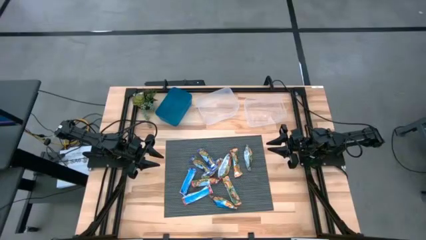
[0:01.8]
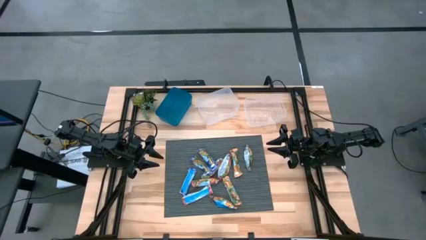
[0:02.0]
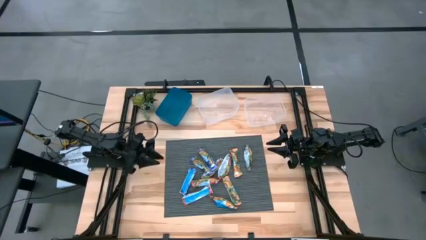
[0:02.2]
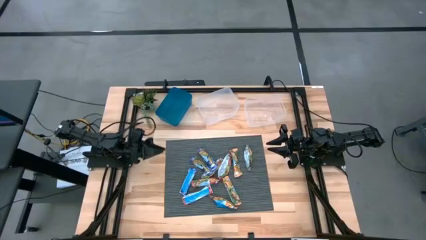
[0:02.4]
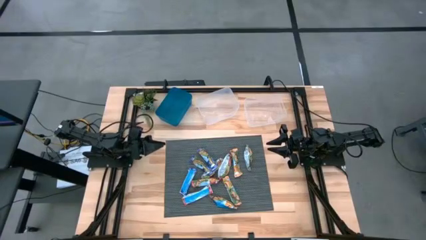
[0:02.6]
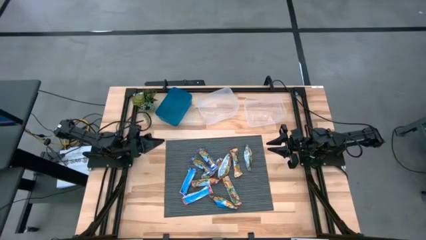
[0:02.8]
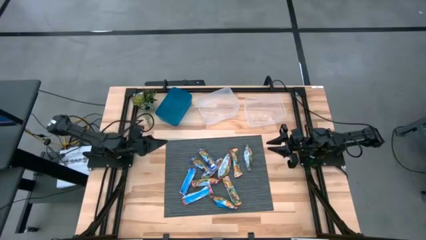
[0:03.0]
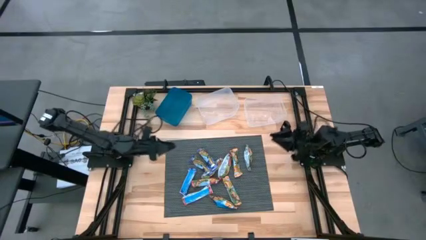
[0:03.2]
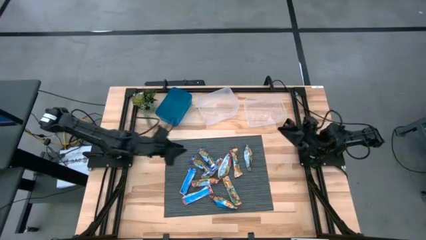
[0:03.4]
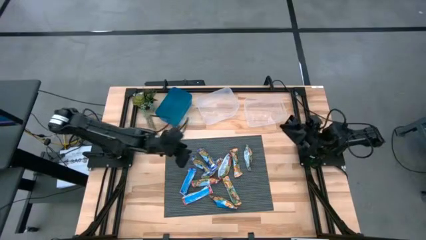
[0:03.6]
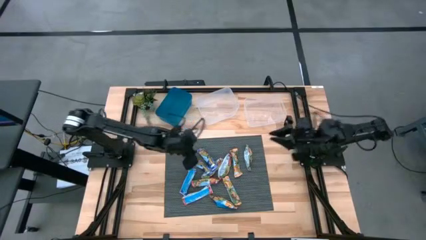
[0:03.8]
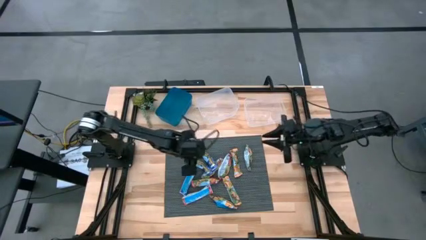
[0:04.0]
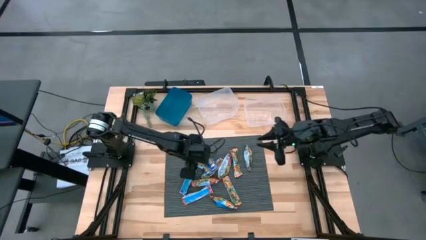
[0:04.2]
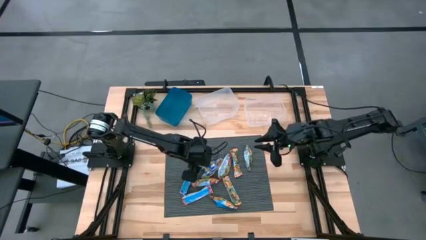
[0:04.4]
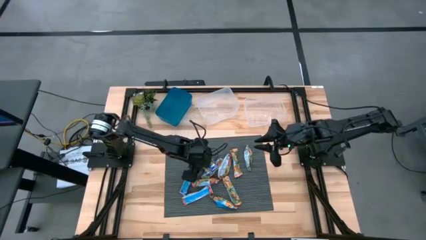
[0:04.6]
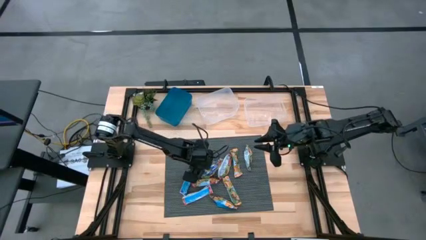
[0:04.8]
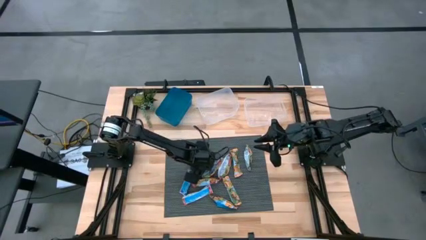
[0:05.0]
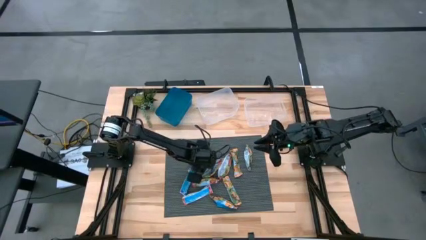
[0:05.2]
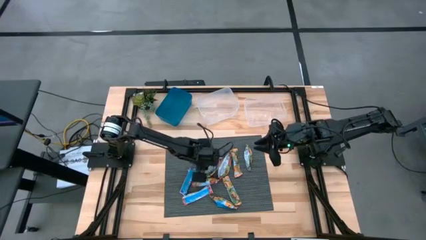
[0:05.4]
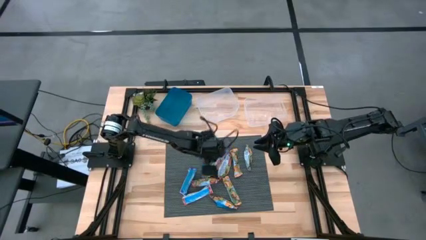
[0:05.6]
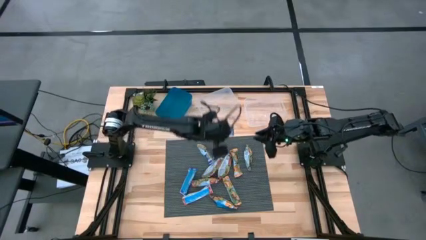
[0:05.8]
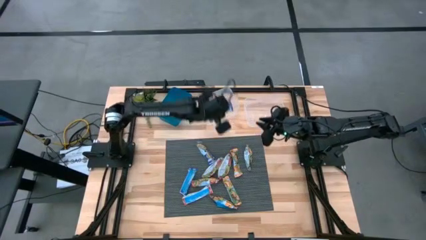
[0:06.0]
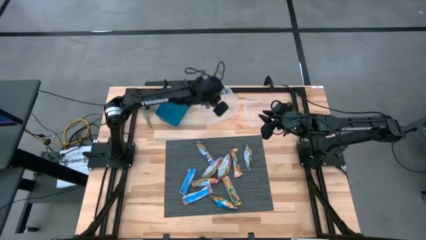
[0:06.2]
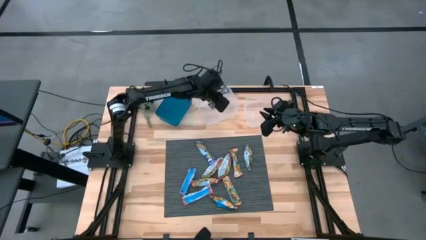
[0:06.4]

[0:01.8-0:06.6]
Task: Pick and place Granola Bars by type
Put the middle blue granola bar into the left transparent bin

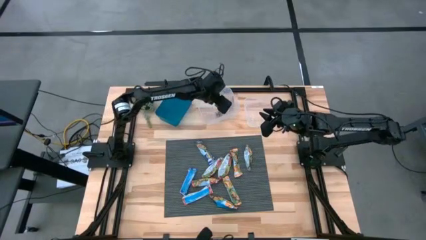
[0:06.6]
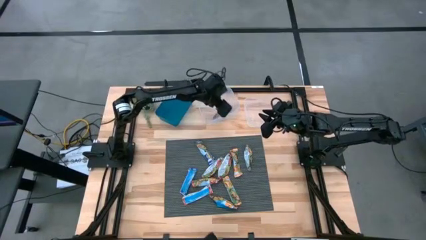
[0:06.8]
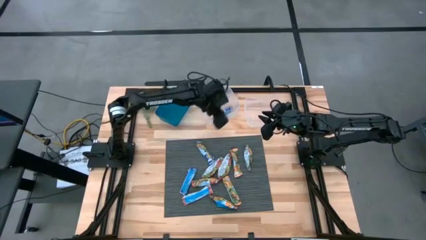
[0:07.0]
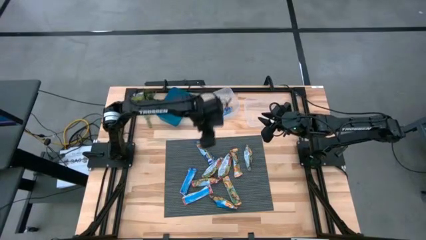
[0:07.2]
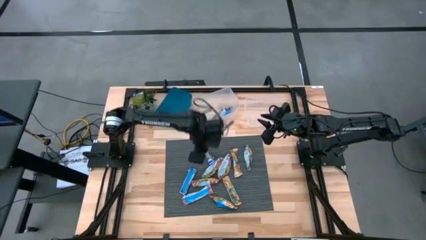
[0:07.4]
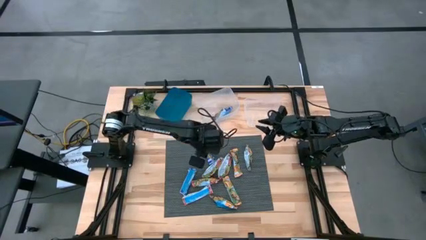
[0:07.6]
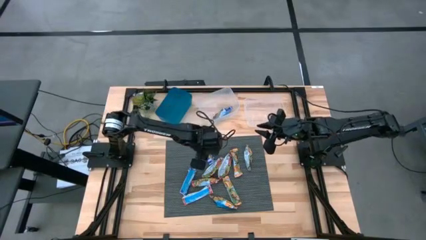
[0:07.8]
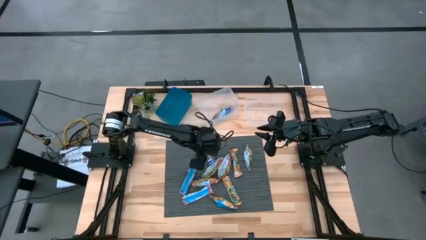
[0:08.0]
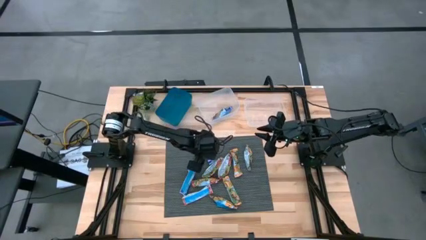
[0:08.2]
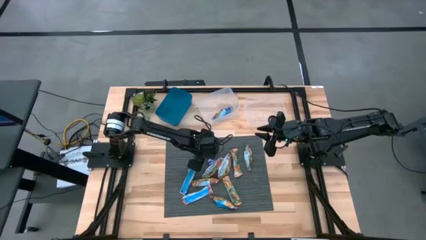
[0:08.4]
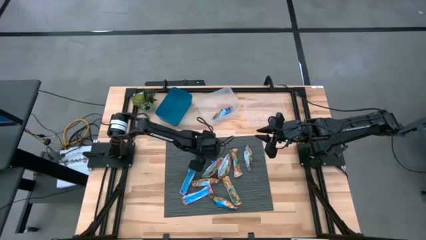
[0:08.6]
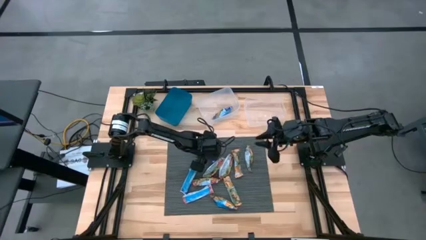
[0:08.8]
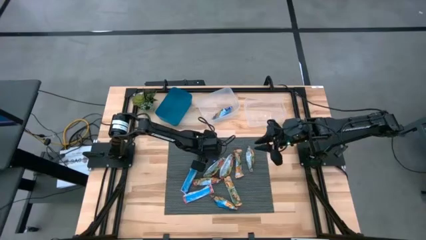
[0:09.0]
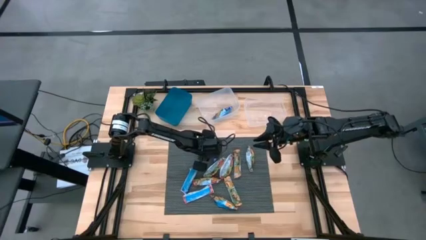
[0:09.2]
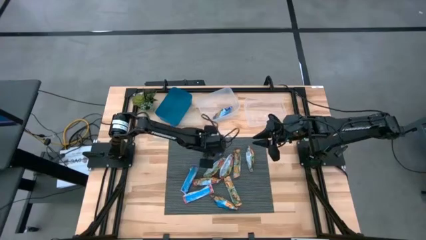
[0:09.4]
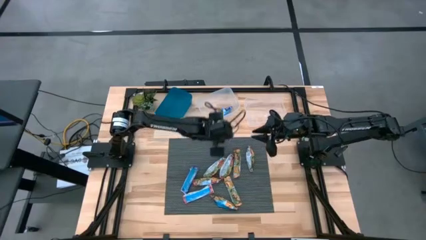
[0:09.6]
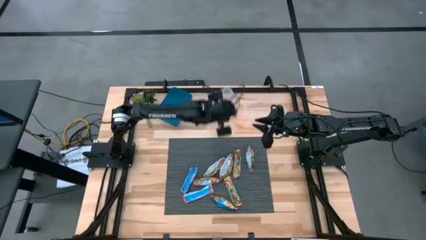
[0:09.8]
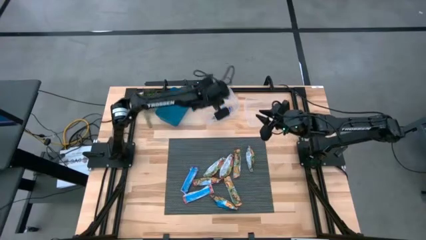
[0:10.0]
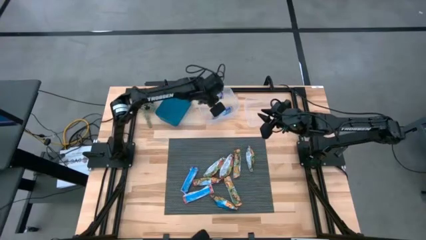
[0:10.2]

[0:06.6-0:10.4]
Put the top blue granola bar into the left transparent bin

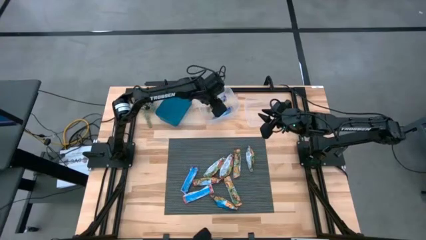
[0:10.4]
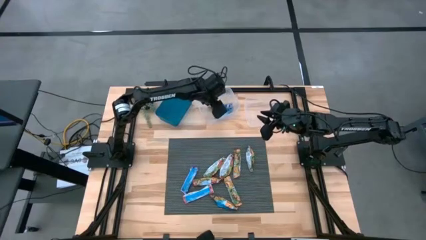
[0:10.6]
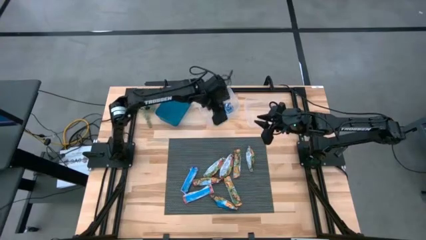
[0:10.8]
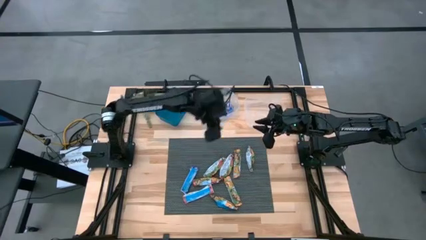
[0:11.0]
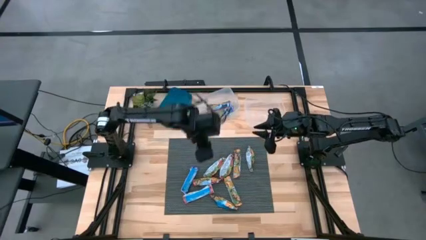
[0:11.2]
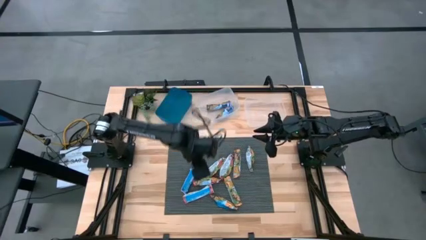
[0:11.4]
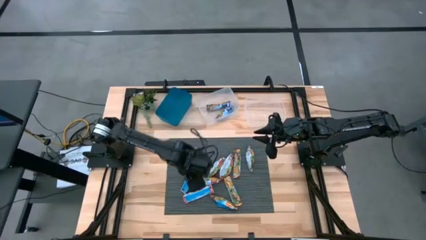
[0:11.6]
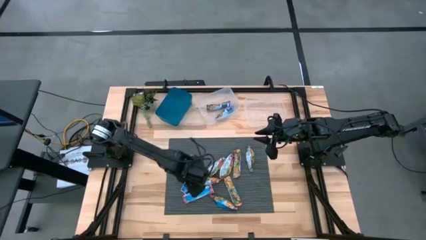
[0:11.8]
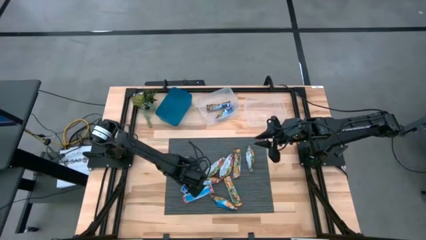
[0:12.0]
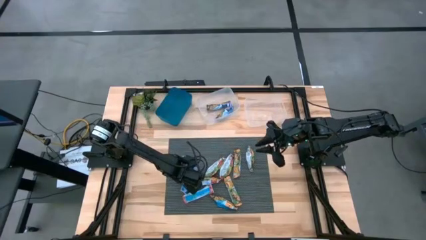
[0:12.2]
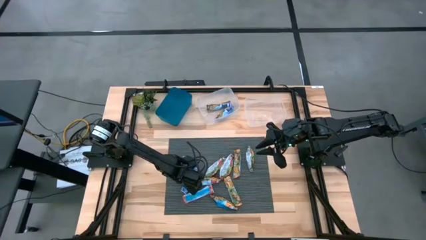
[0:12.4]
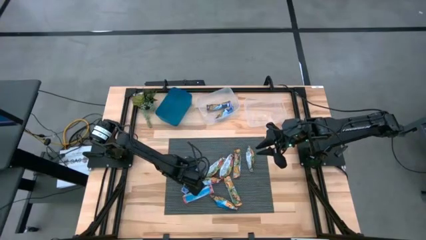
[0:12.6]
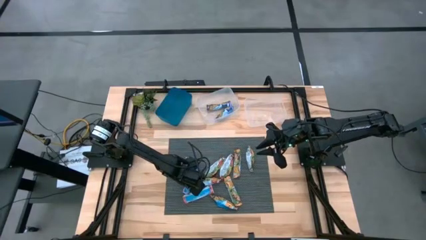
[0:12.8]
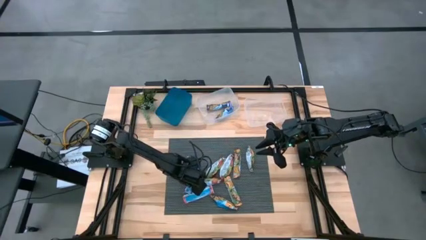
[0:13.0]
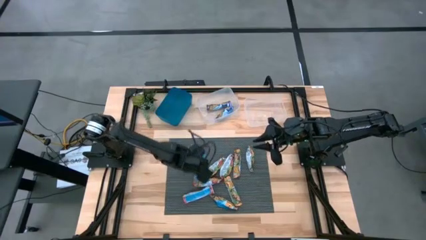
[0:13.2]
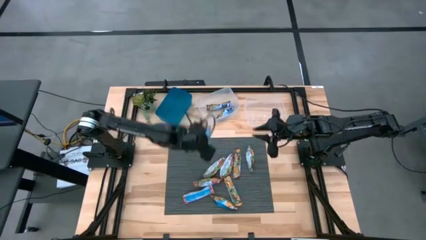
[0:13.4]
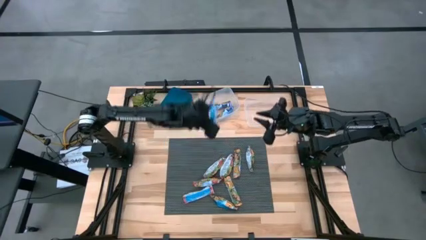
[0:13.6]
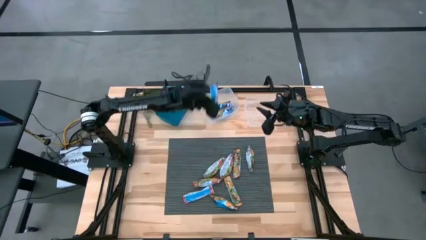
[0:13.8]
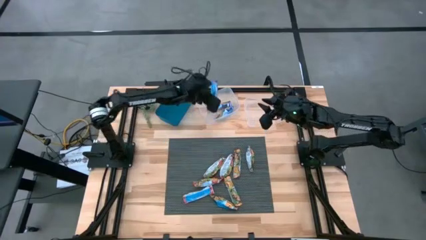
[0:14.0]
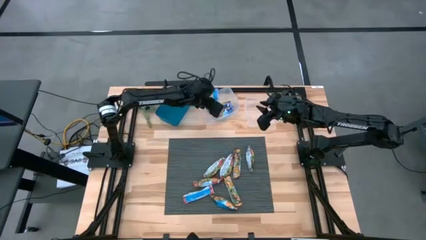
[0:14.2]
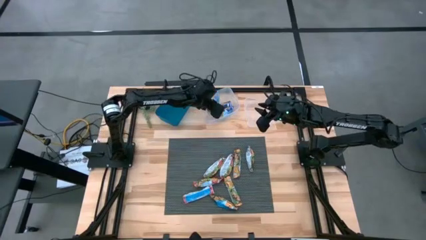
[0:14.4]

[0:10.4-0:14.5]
Put the blue granola bar into the left transparent bin

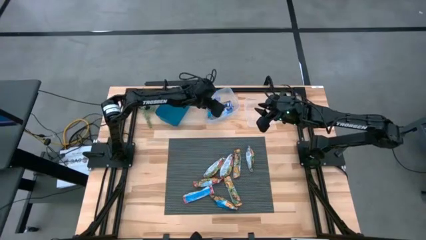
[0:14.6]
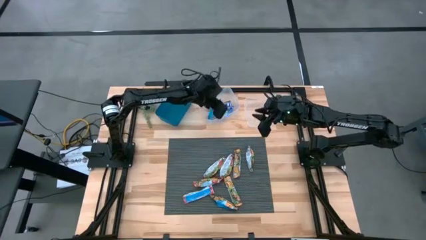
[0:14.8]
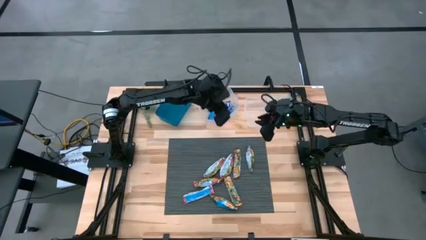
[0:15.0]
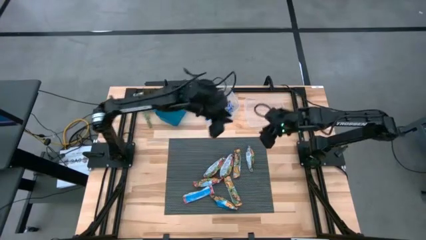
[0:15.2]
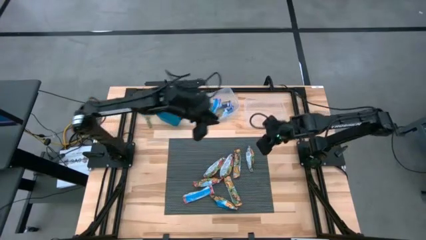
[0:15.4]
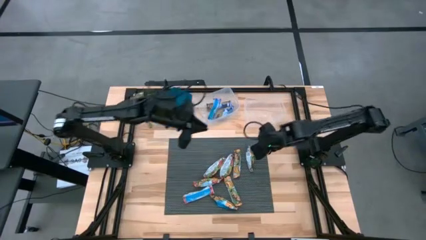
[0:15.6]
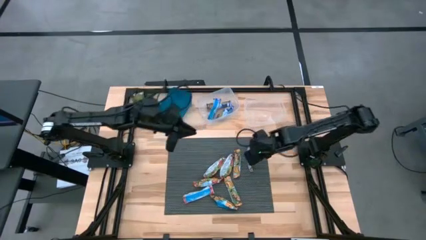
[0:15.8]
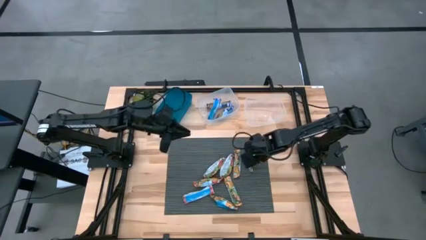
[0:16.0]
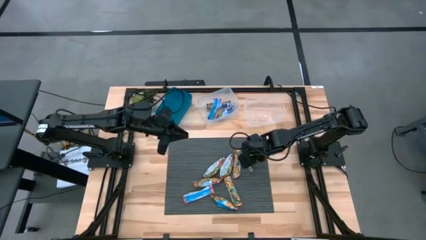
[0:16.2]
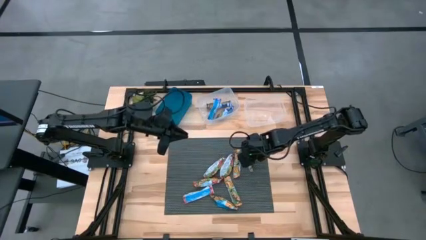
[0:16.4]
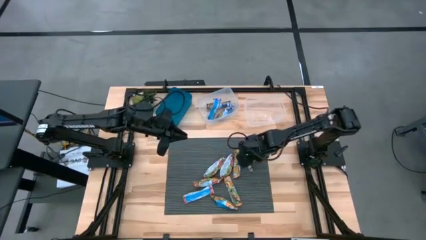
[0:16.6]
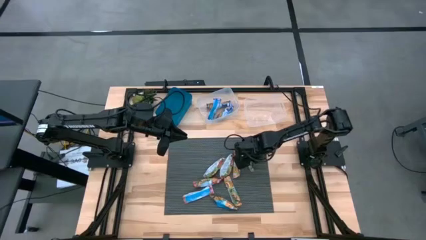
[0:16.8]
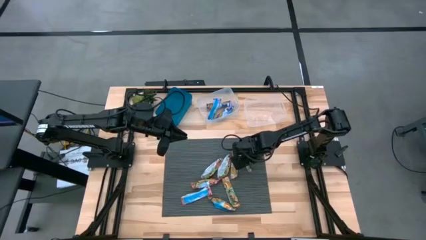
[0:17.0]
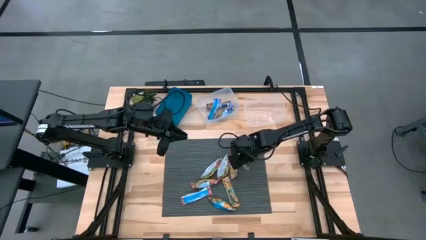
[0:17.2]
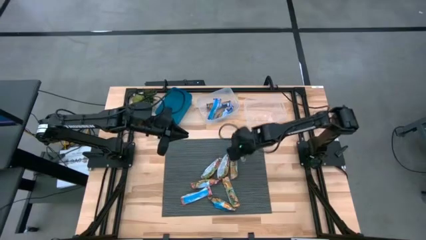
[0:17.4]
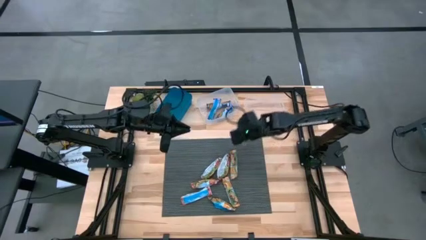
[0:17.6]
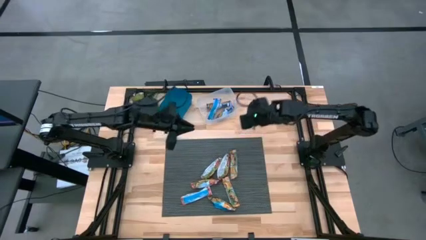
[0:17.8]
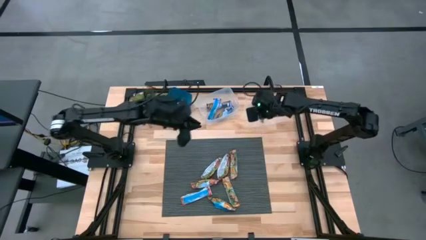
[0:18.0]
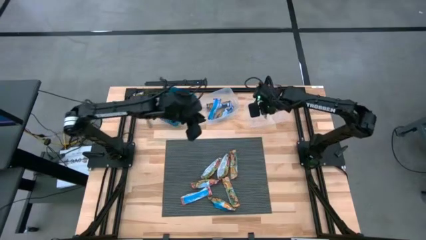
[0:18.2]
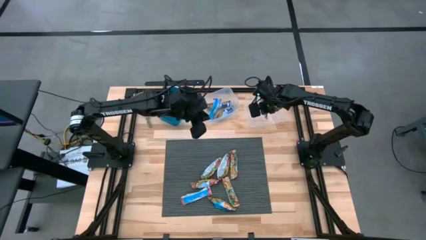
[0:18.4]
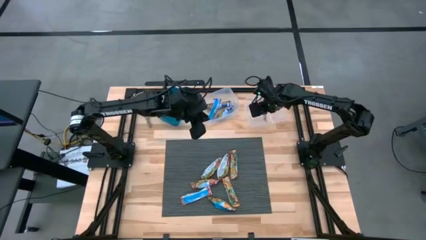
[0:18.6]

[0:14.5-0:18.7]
Put the yellow granola bar into the right transparent bin
